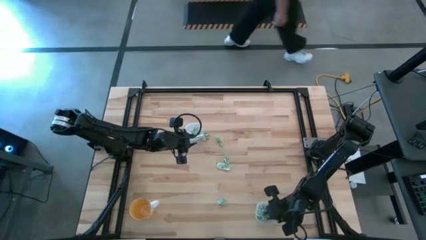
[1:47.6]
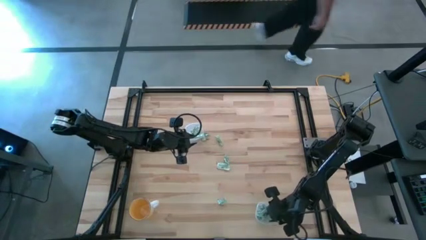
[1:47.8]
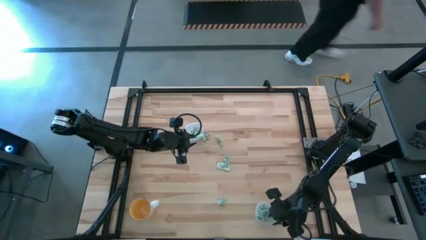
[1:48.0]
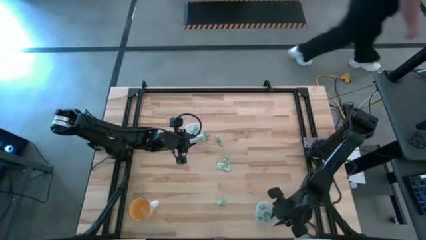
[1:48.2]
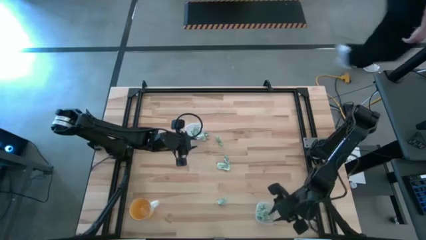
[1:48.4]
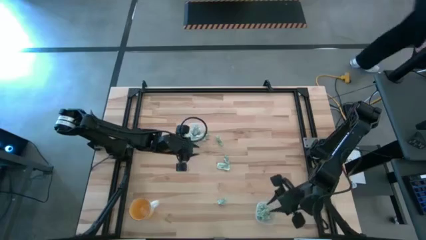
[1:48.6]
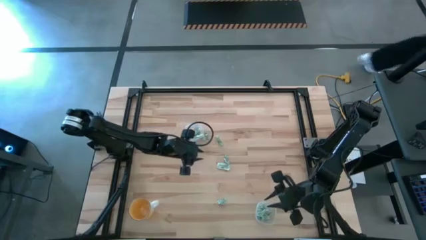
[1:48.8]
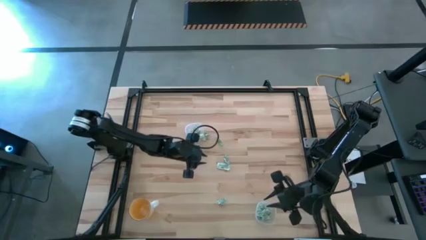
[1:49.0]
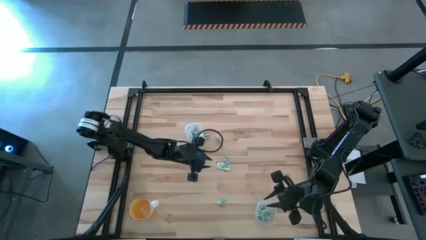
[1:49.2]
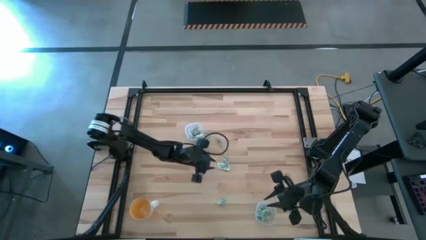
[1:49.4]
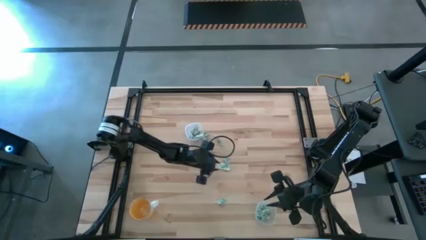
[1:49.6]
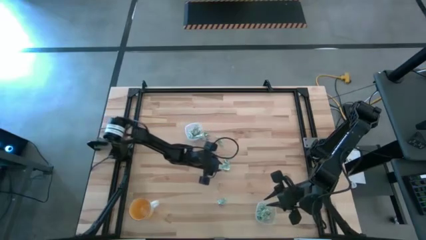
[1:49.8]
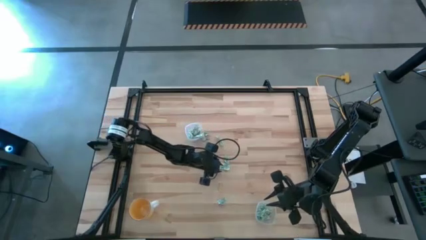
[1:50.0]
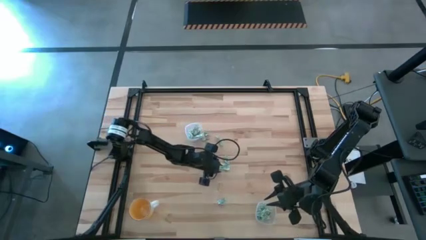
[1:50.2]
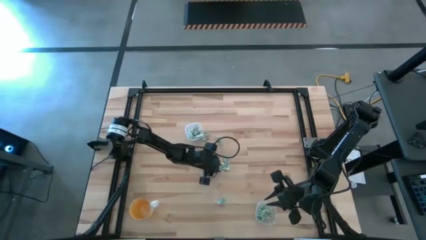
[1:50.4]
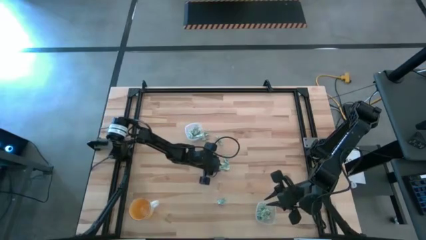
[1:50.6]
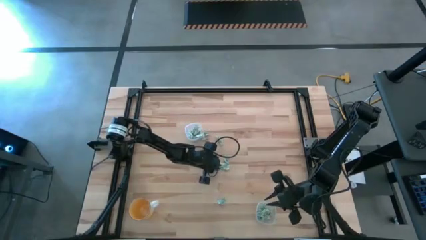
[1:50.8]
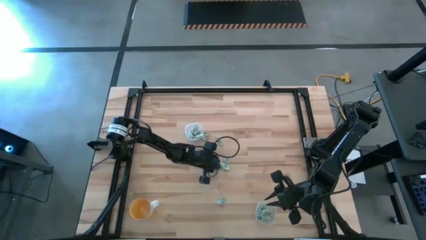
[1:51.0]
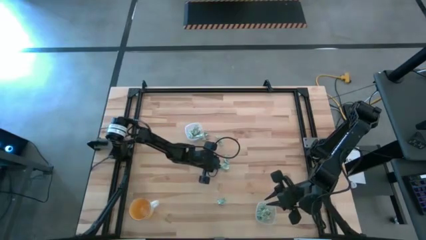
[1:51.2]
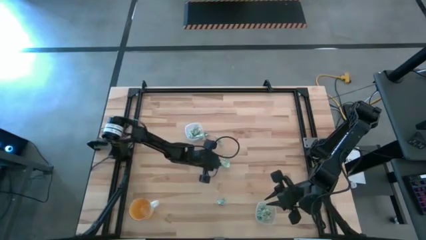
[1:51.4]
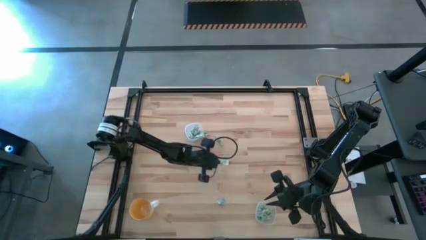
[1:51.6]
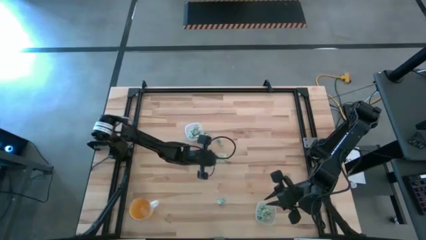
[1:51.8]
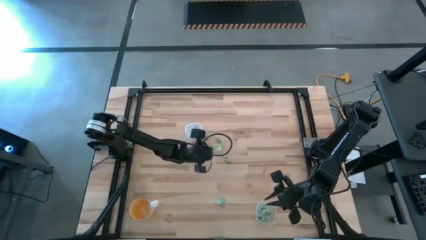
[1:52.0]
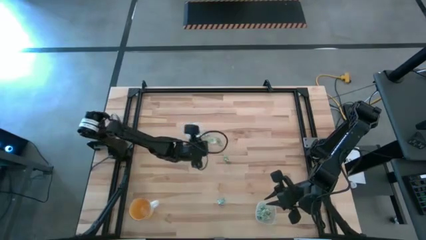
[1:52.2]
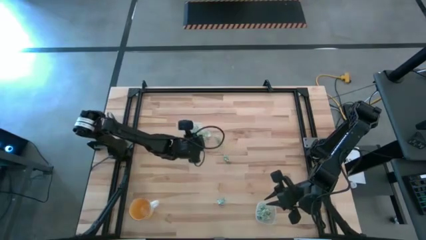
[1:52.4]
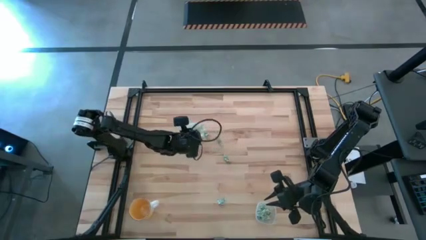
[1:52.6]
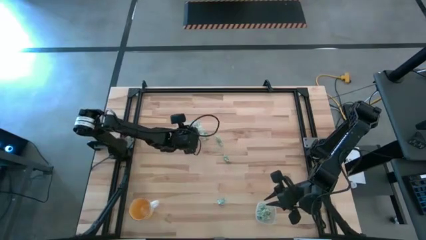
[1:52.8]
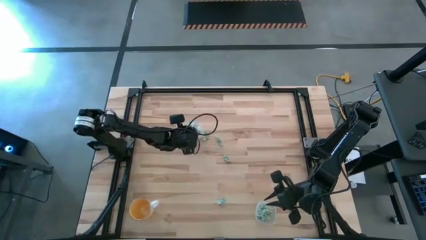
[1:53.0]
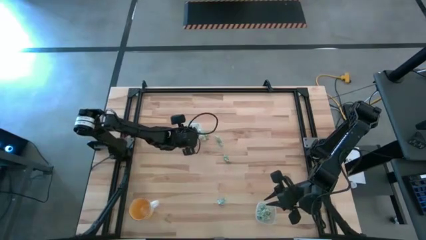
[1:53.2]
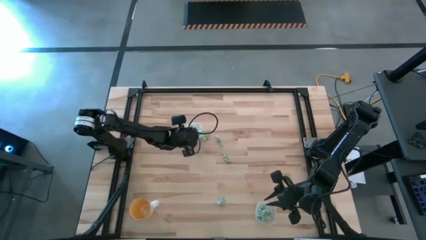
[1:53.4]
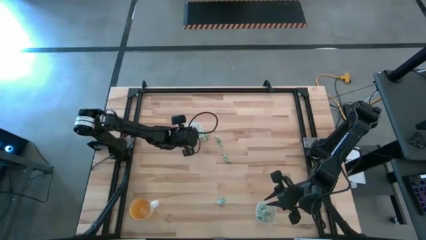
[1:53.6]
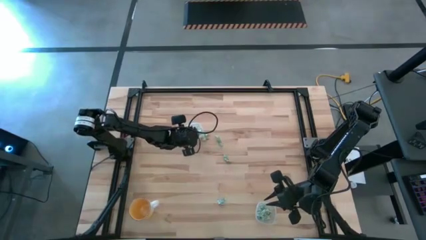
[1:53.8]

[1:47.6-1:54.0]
Task: Pick and place Stevia / Truvia into bins
Put the stevia packet into the top transparent container

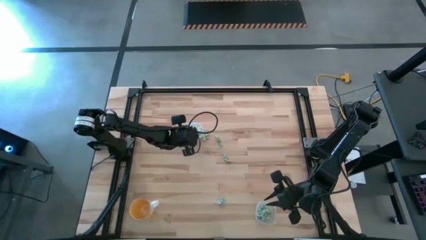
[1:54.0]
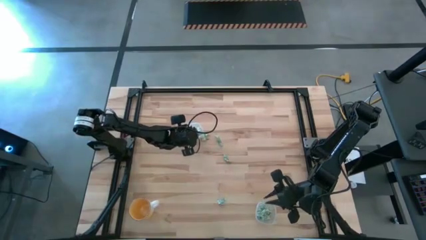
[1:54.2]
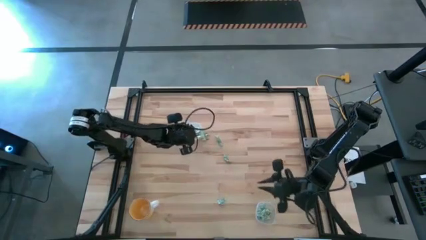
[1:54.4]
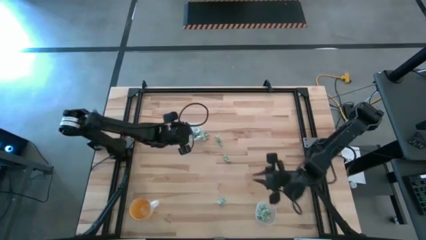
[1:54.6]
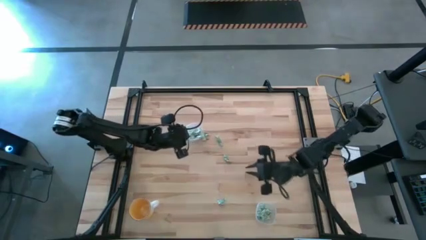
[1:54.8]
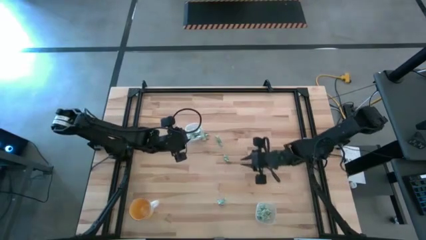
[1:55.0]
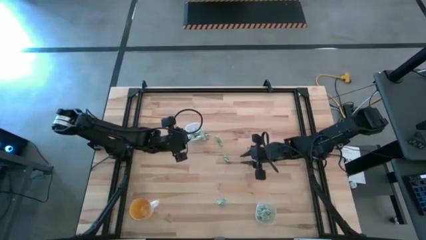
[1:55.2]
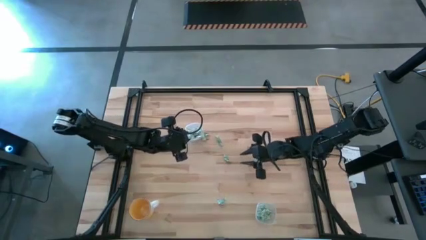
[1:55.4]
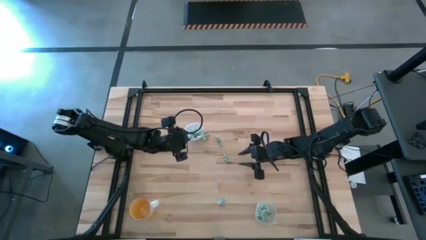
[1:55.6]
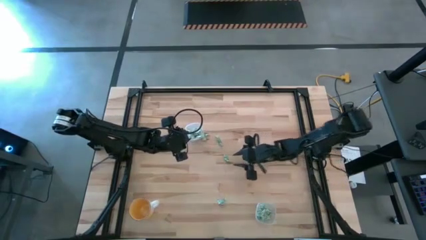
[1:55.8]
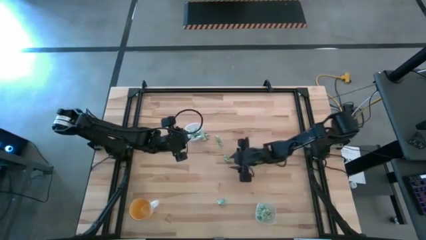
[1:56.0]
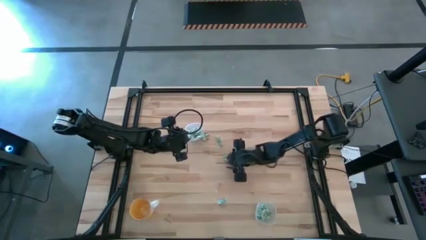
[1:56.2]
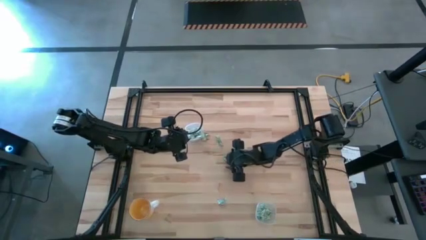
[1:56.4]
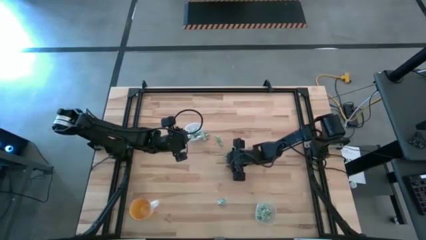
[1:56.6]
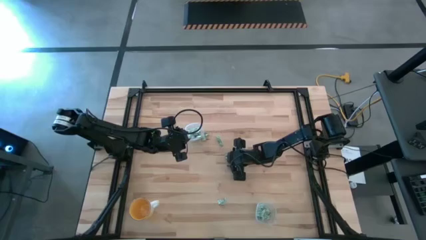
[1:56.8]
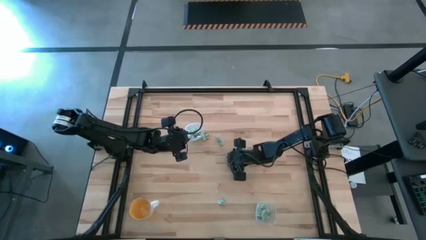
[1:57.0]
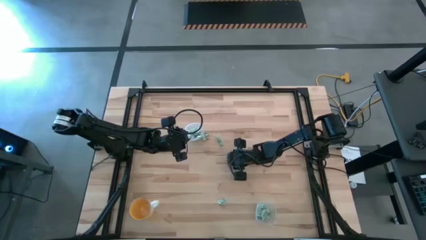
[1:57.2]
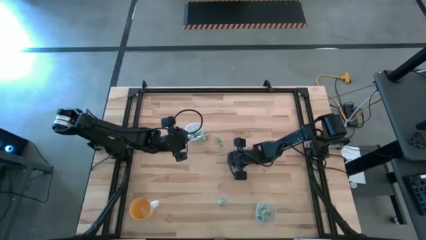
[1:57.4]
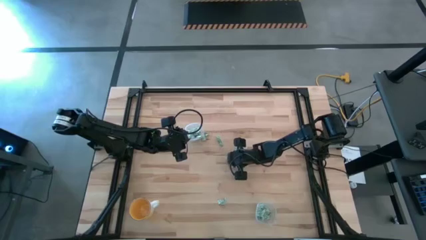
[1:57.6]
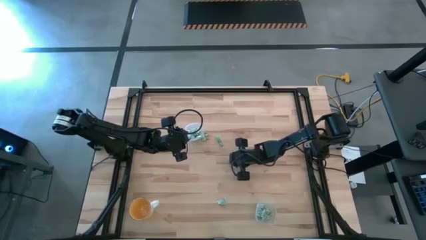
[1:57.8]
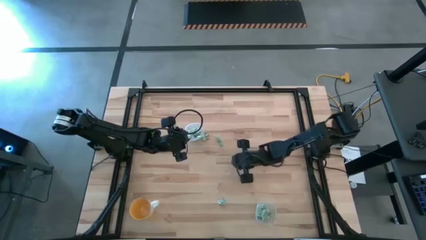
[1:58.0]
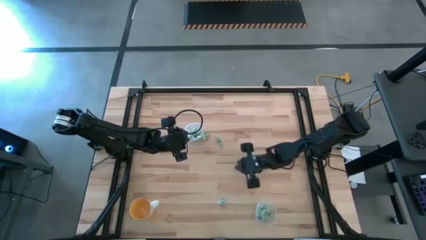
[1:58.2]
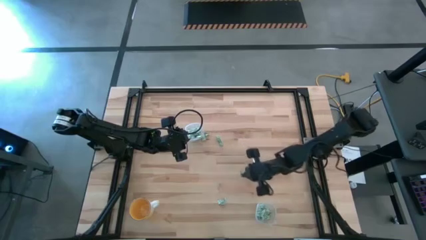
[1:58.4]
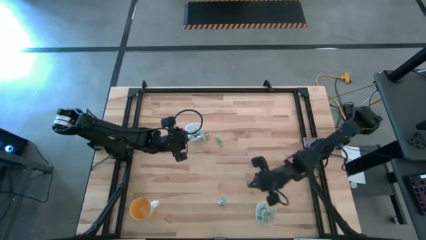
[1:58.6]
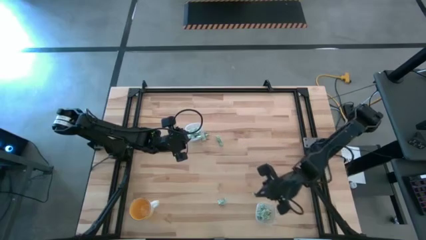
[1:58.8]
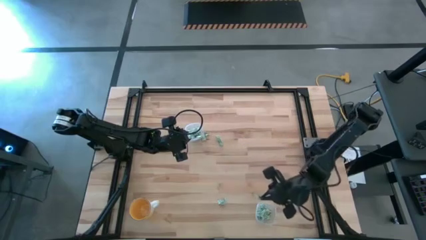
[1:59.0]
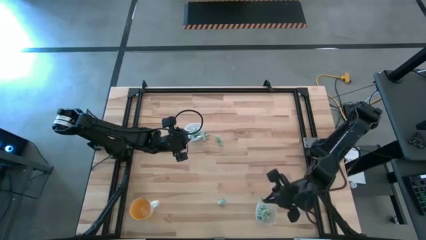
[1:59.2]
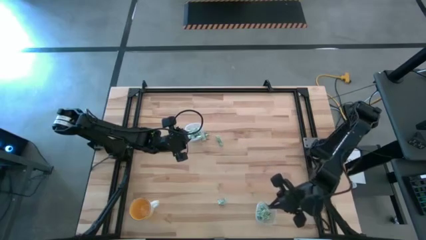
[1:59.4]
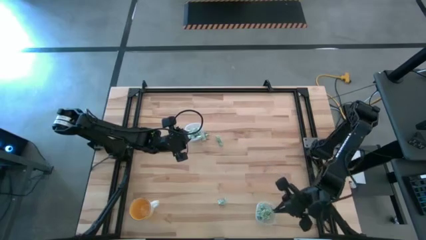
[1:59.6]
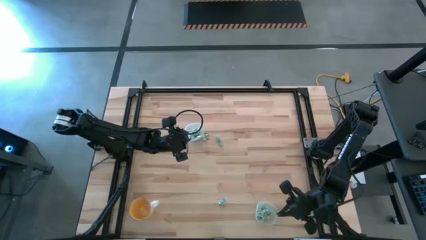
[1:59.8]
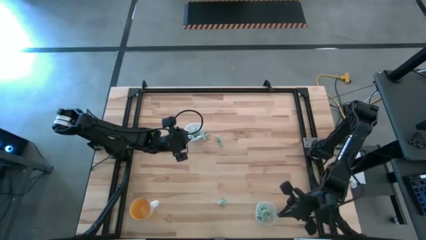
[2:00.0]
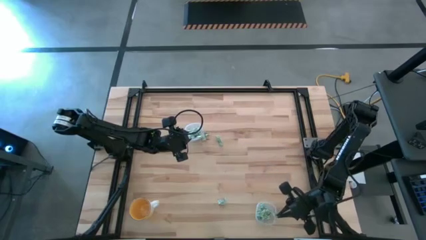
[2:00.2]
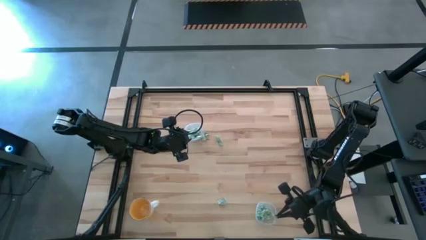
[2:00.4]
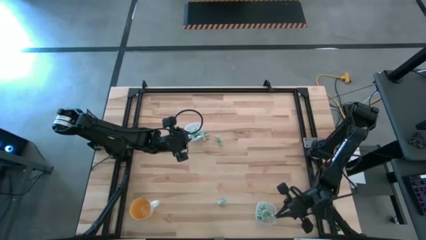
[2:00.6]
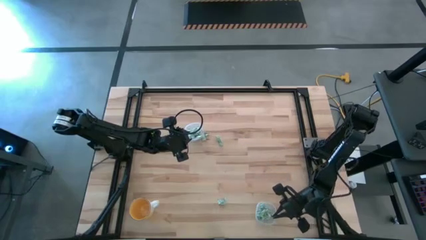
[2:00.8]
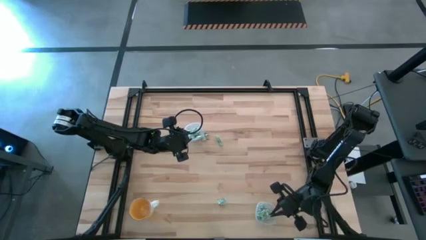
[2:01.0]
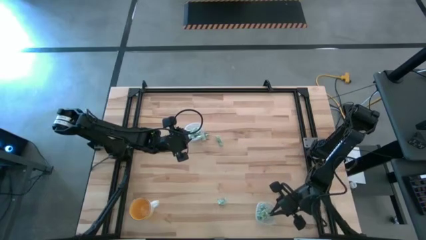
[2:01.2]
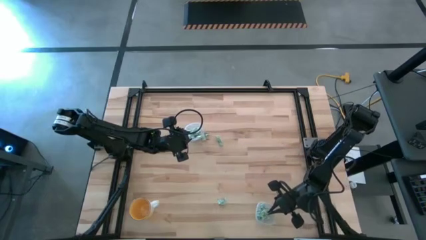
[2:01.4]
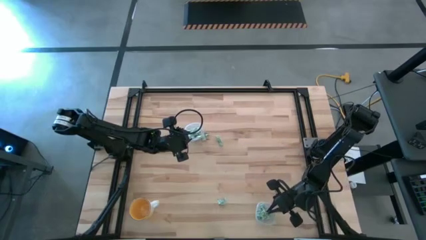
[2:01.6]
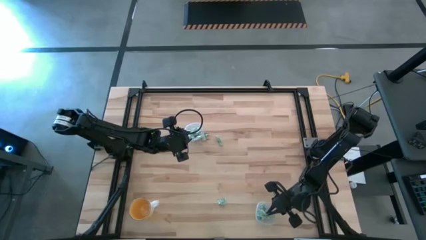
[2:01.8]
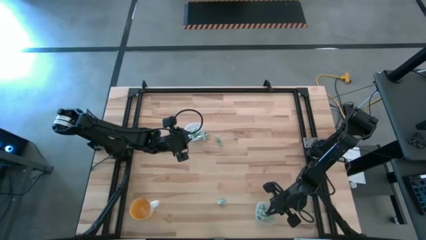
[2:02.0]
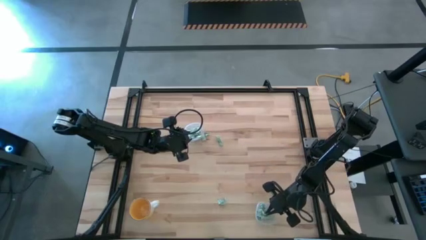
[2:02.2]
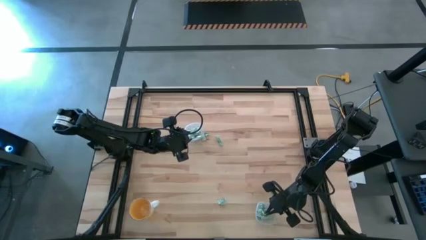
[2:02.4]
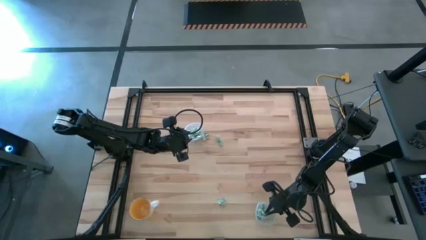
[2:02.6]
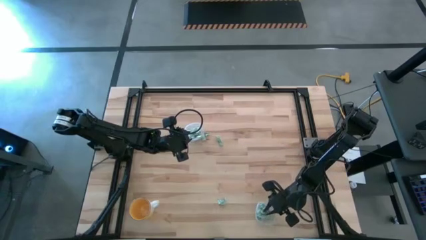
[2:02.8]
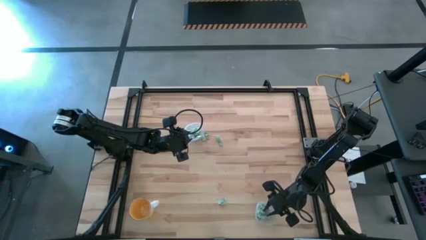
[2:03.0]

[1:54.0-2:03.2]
Put the stevia packet into the bottom transparent container

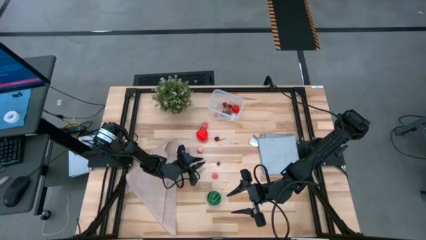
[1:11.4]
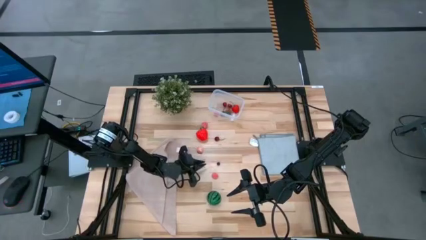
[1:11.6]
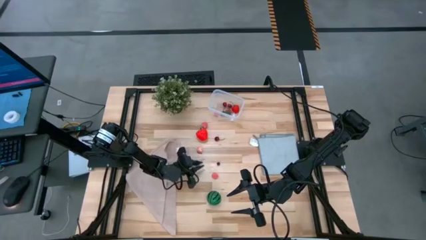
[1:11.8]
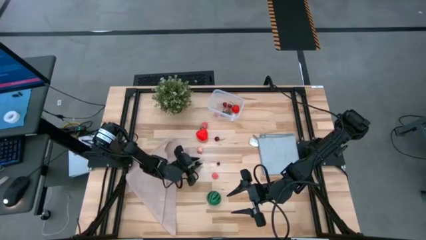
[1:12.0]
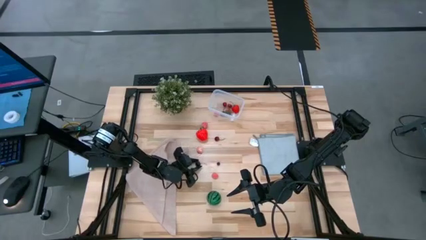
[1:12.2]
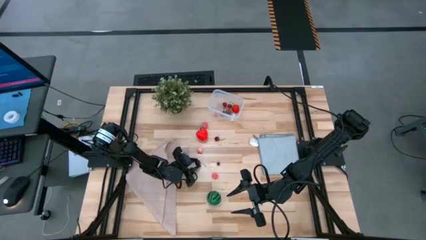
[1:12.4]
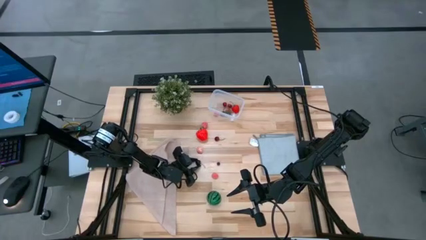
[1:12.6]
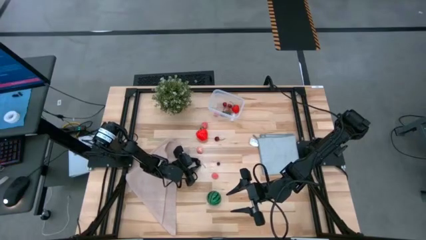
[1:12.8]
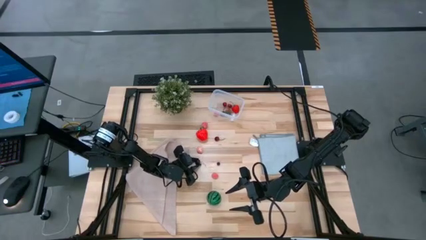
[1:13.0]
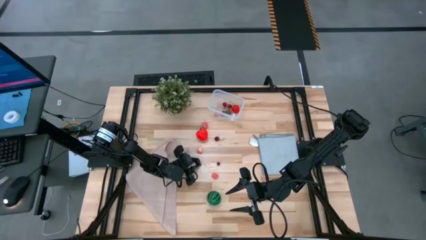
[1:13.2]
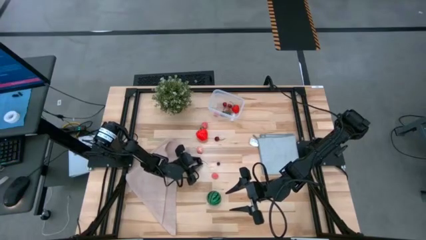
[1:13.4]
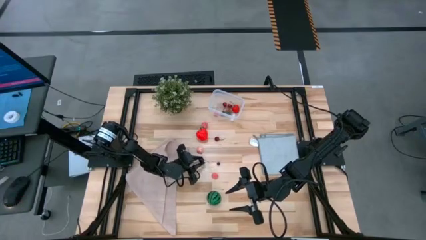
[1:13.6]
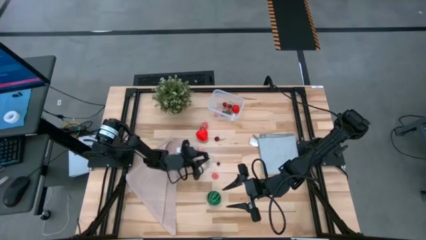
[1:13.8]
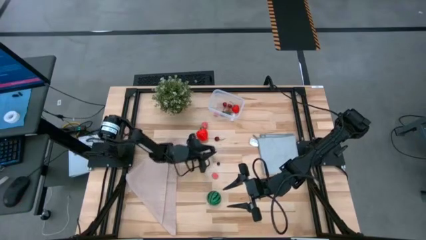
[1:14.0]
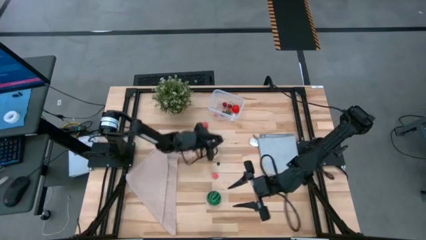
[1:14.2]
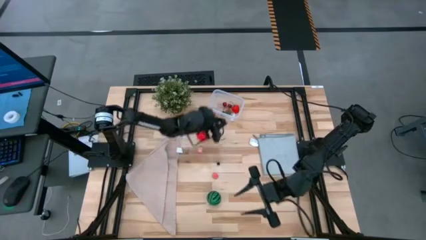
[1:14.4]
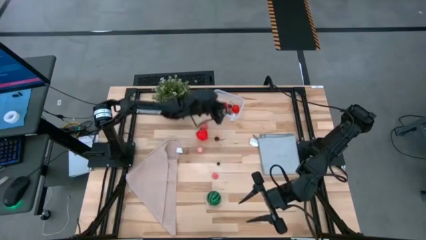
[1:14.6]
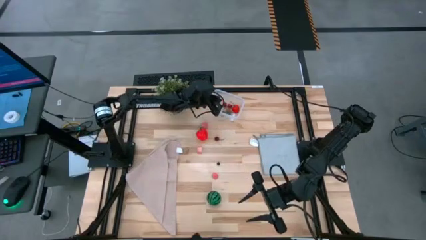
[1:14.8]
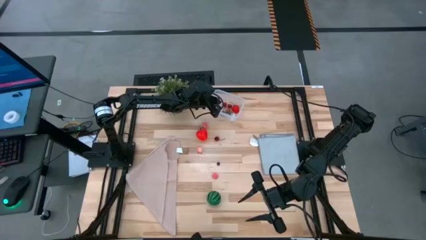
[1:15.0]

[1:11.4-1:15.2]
Task: Pick and placing Produce into tupperware
Put the black cherry into the transparent bin
